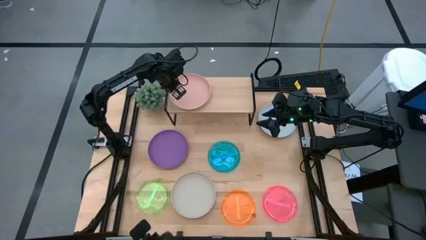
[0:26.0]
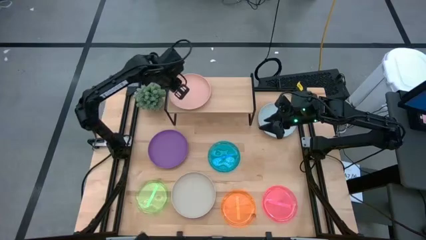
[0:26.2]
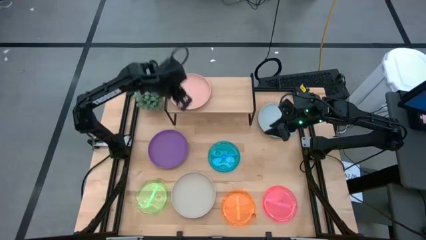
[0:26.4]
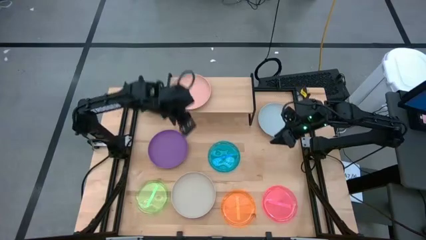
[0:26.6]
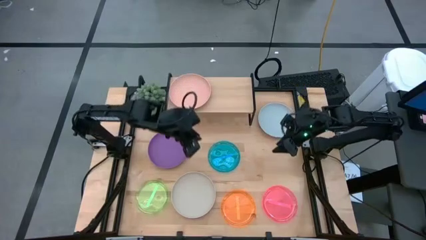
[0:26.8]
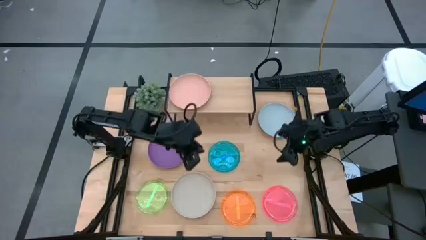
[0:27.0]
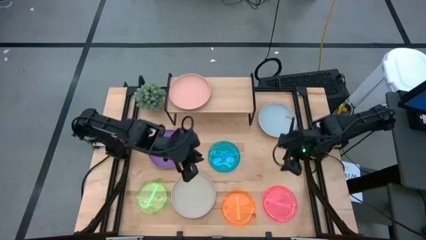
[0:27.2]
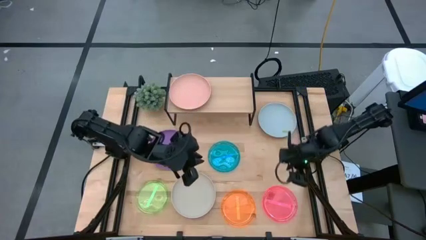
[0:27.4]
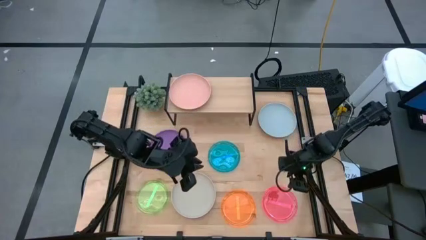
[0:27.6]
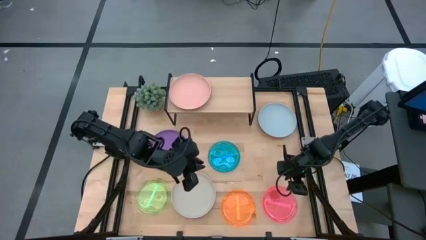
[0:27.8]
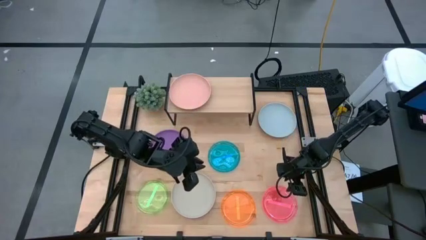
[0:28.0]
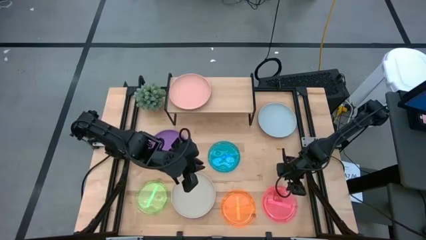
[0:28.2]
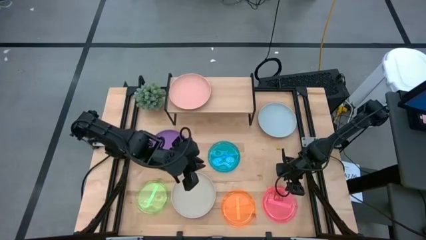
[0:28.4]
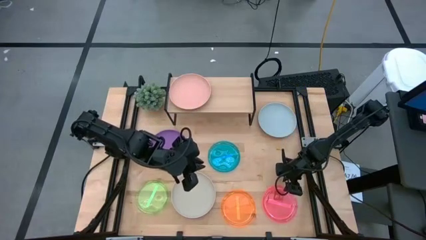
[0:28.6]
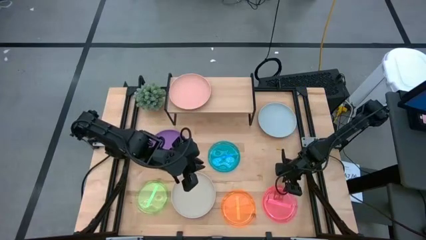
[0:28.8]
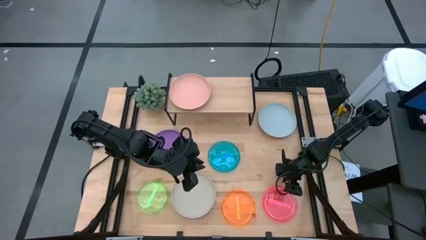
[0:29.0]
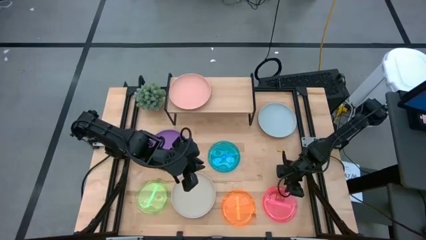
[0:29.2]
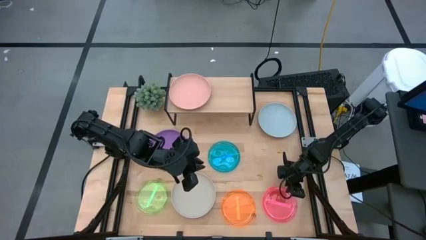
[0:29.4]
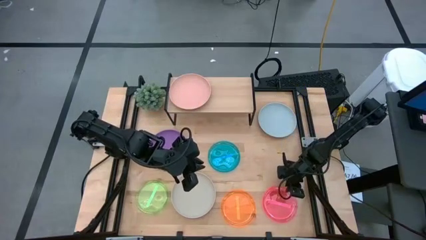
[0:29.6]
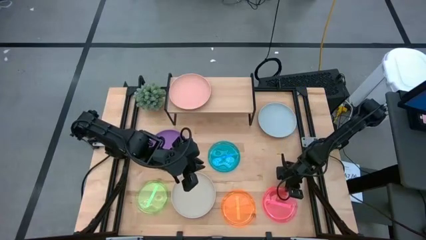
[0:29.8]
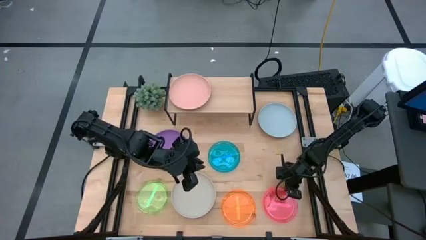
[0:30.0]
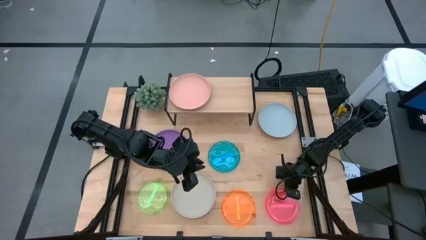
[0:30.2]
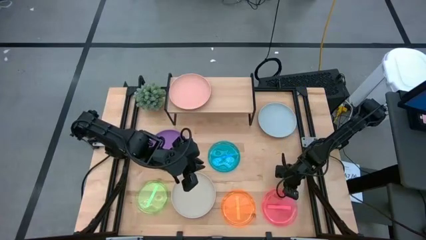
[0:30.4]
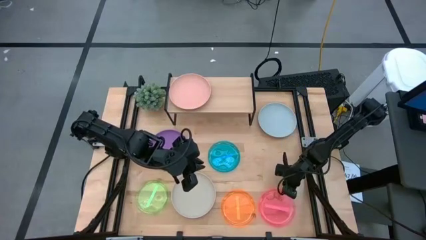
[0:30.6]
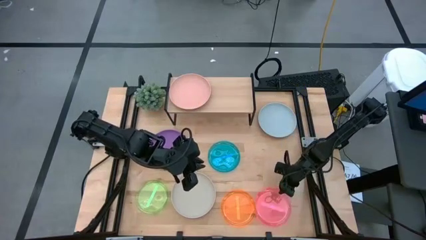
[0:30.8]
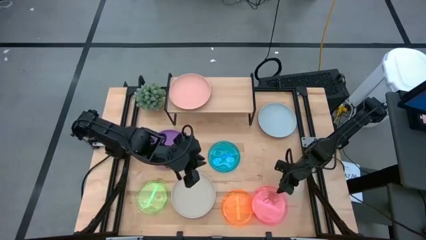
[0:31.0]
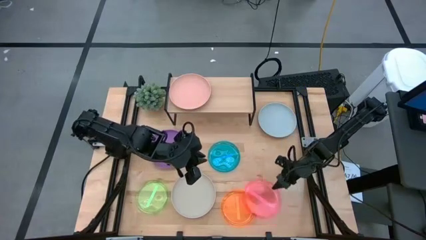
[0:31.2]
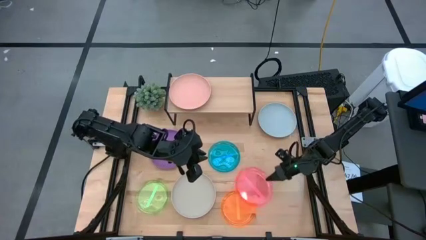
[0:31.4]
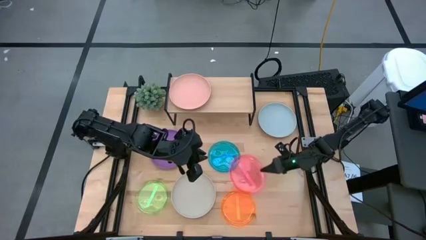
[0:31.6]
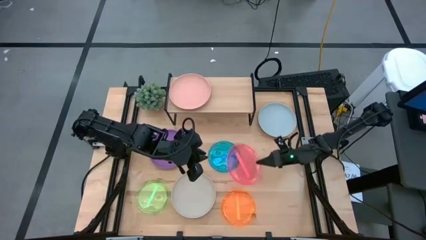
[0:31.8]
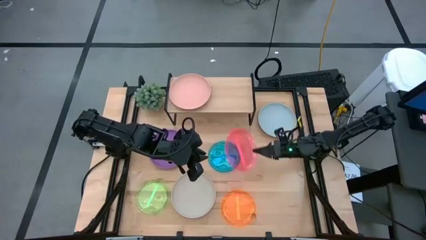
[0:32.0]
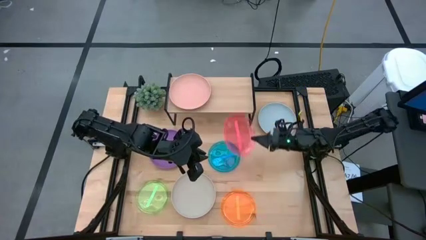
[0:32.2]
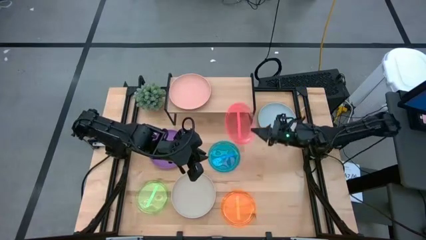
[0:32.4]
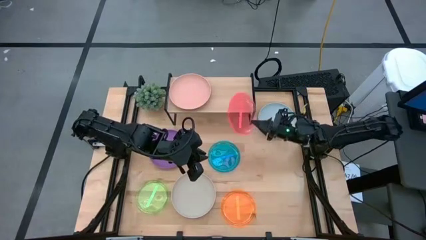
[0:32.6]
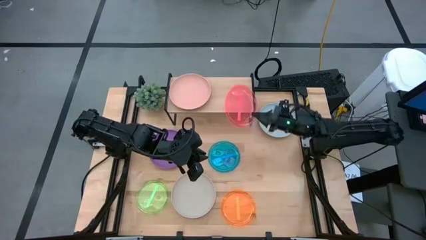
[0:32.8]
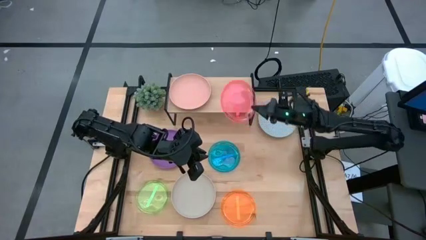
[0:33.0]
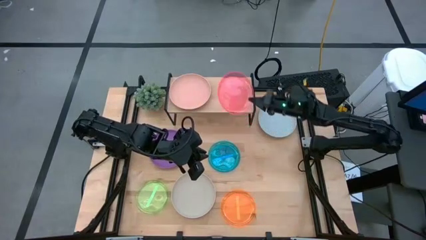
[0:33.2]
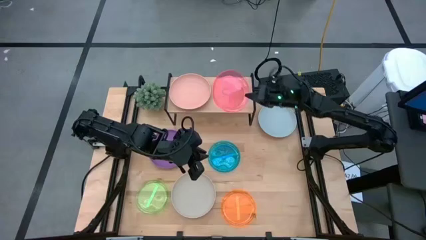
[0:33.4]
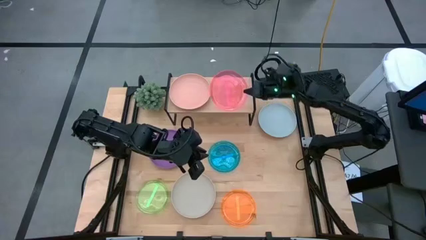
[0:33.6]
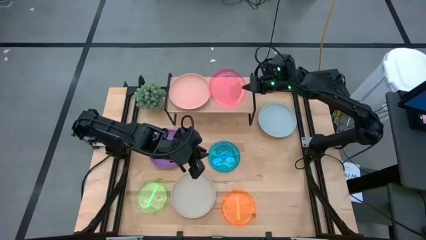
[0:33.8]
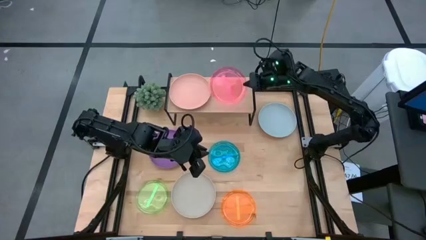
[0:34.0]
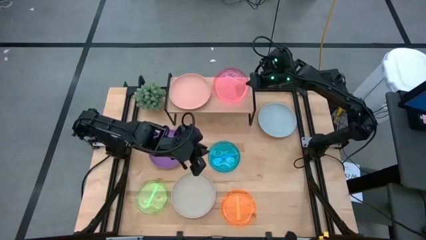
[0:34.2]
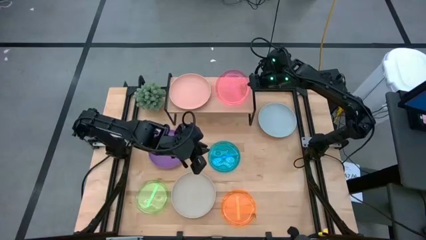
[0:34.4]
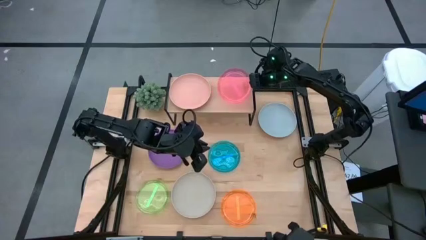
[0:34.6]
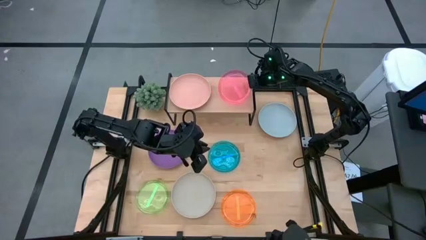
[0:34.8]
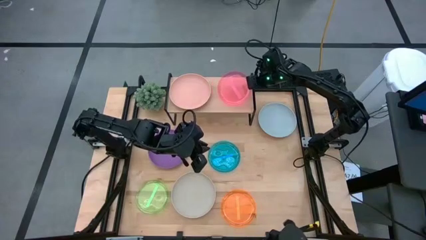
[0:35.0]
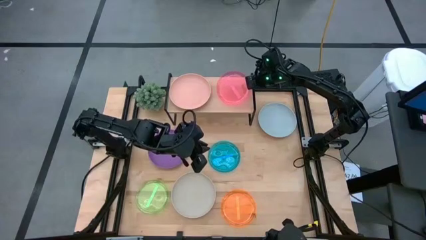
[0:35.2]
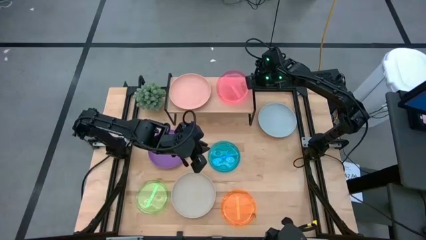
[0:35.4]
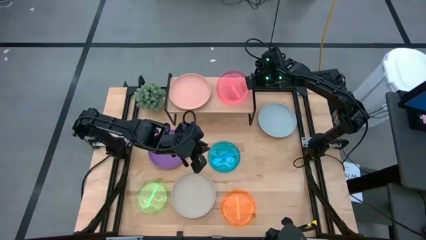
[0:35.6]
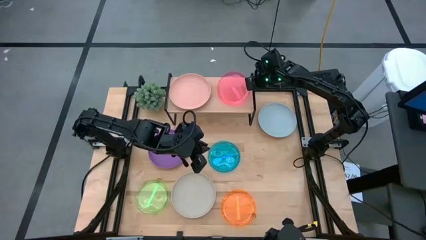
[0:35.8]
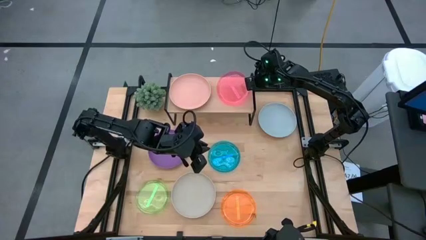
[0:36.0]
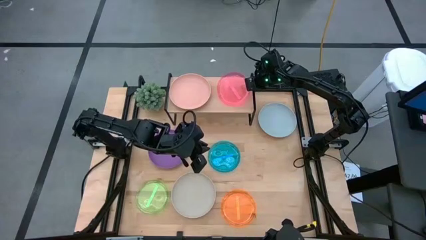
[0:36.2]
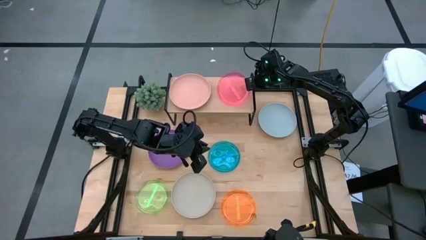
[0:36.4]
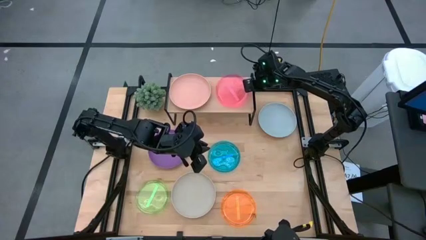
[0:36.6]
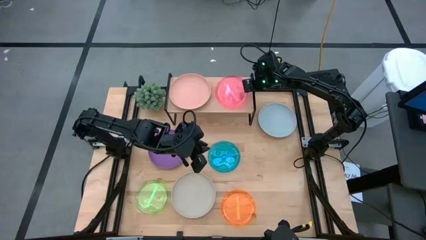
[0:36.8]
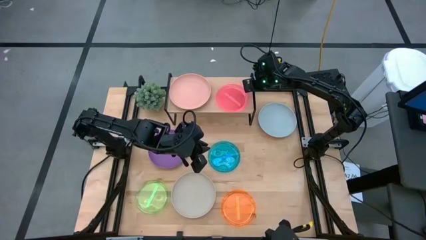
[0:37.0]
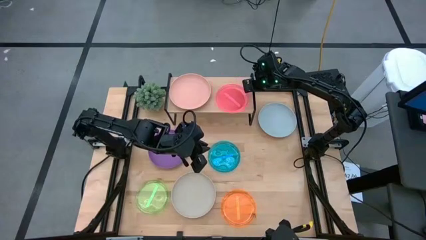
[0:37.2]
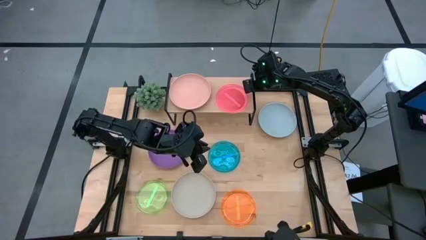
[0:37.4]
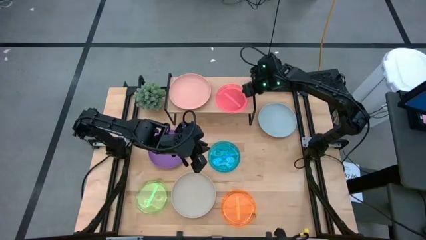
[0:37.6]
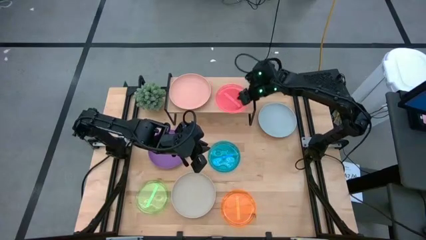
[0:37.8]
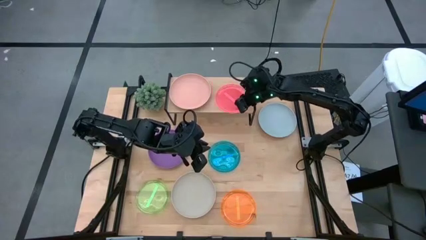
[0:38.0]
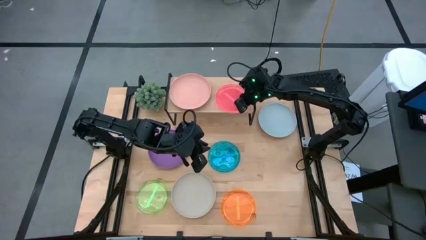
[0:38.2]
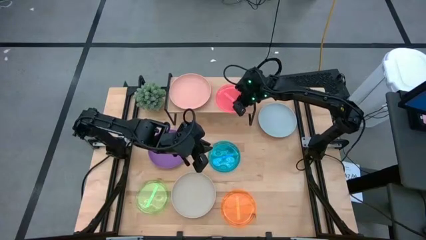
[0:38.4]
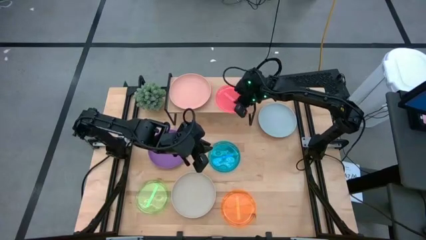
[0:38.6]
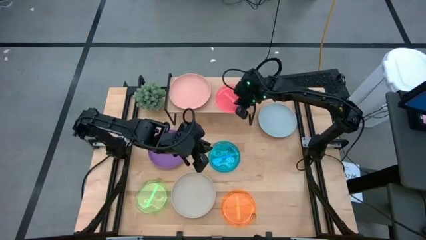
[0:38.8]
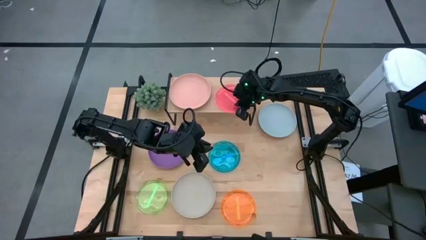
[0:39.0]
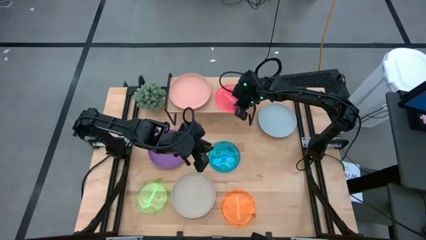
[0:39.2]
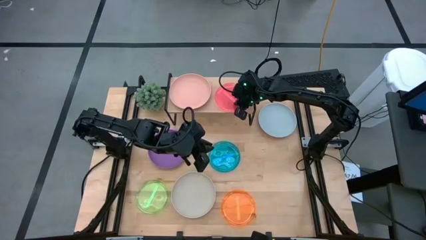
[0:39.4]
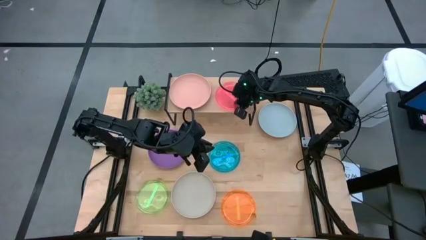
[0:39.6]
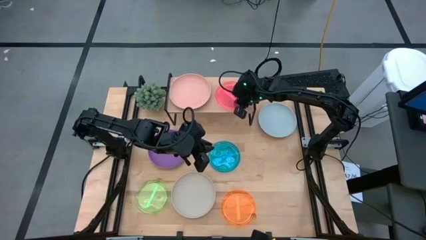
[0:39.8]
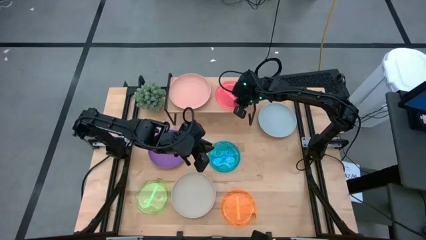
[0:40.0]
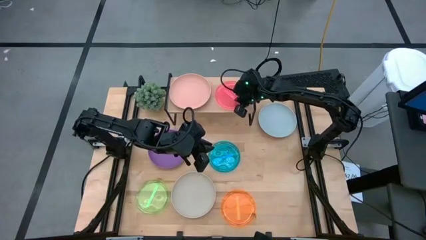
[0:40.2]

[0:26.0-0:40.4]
Task: Place and stack plates onto a shelf
Put the small pink plate on the shelf
